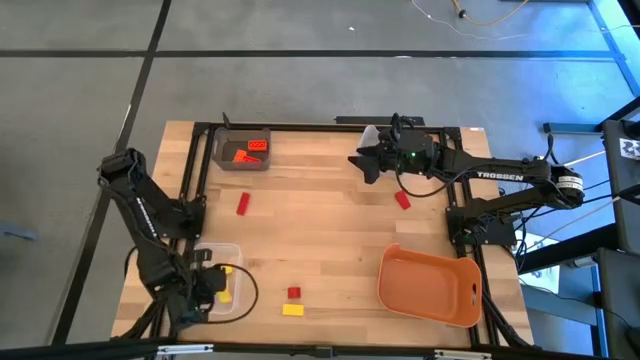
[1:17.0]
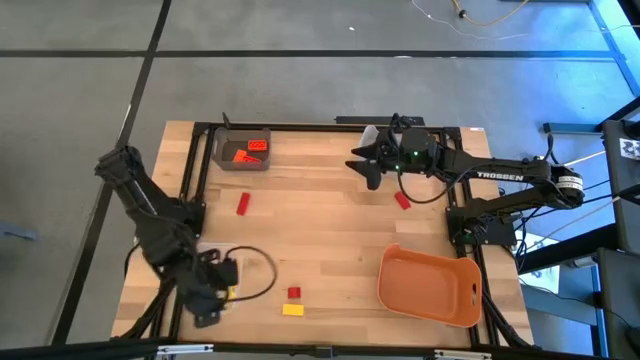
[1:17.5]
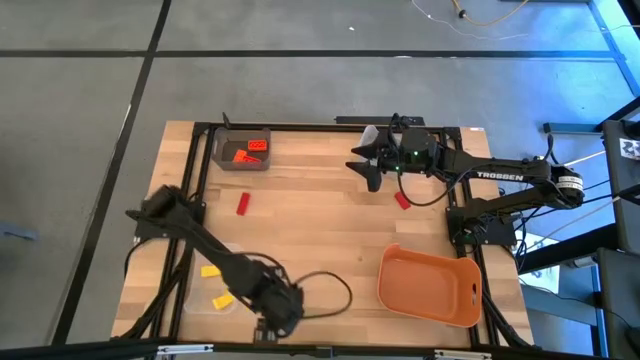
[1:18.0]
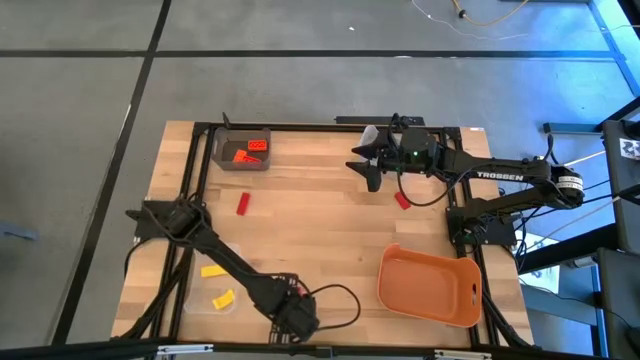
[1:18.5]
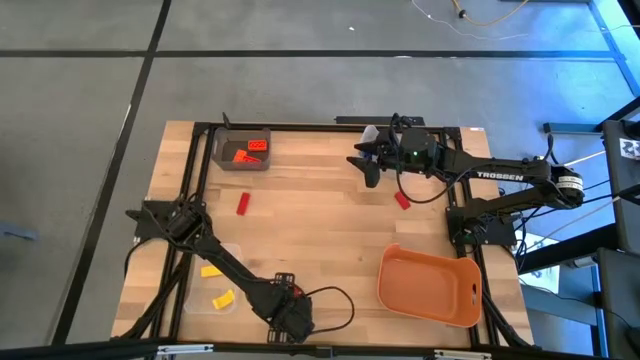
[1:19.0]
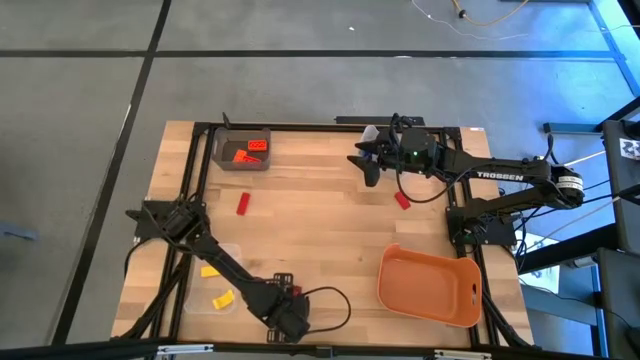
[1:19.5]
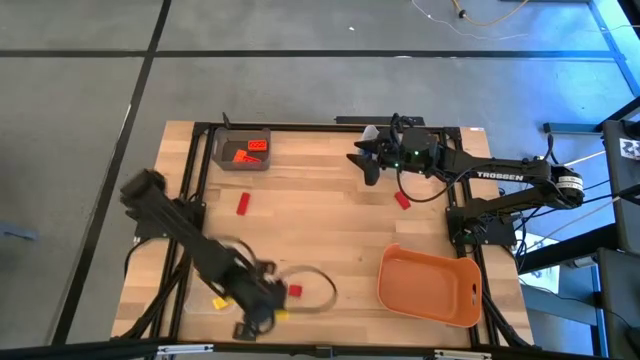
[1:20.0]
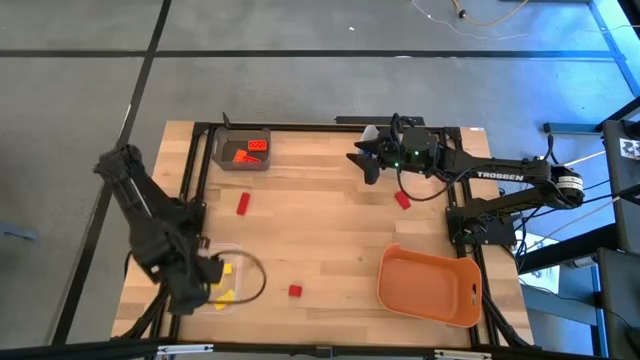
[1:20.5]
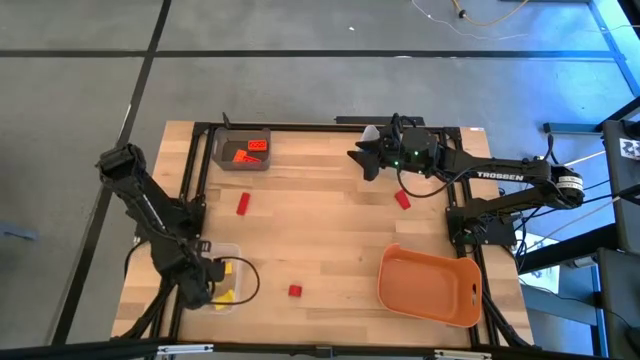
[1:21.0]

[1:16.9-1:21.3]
Task: Sort & place blocks by color
Put the yellow block into the transparent bin

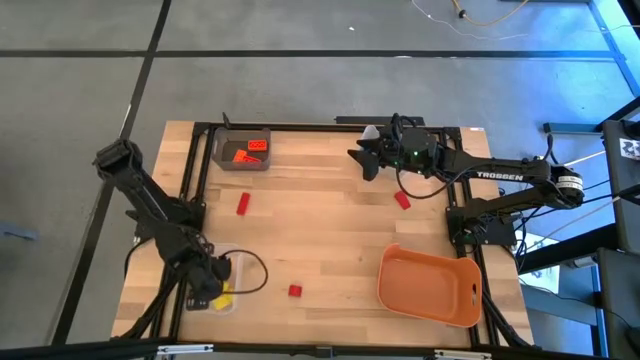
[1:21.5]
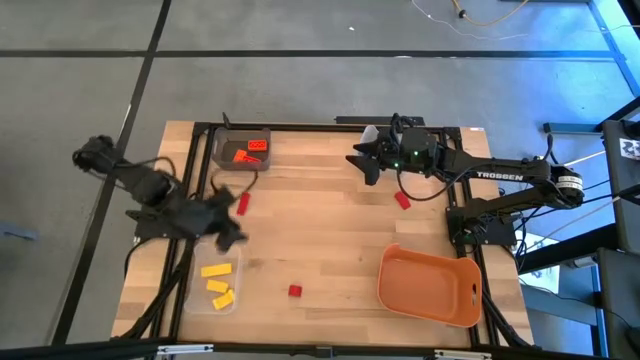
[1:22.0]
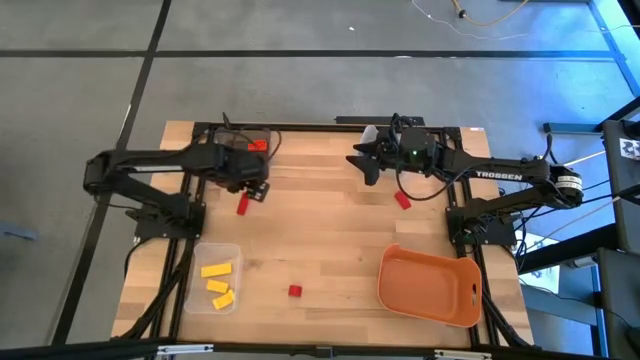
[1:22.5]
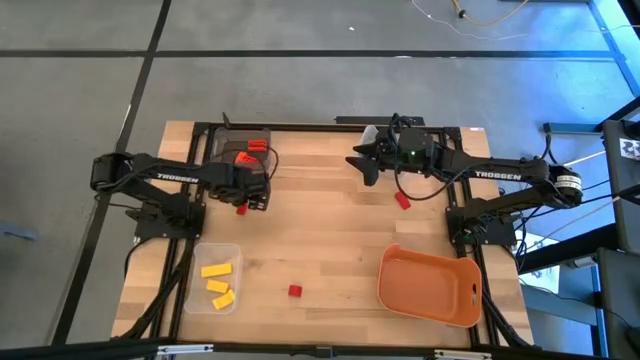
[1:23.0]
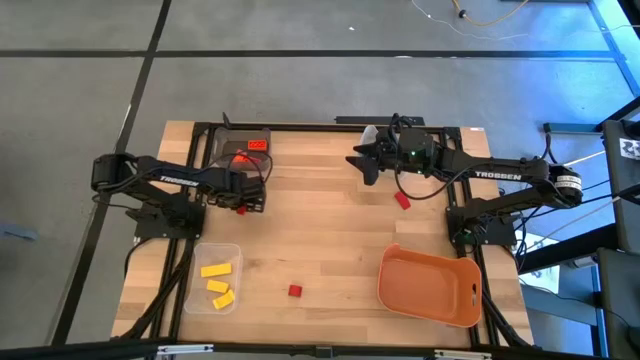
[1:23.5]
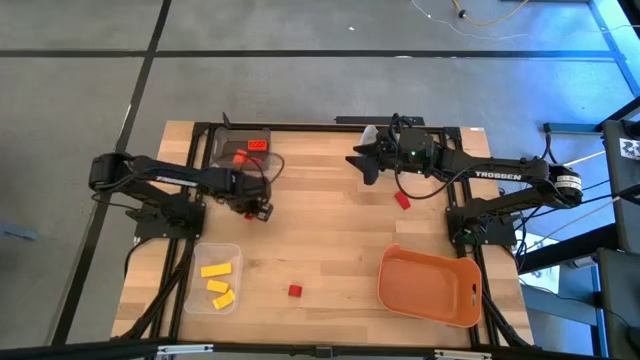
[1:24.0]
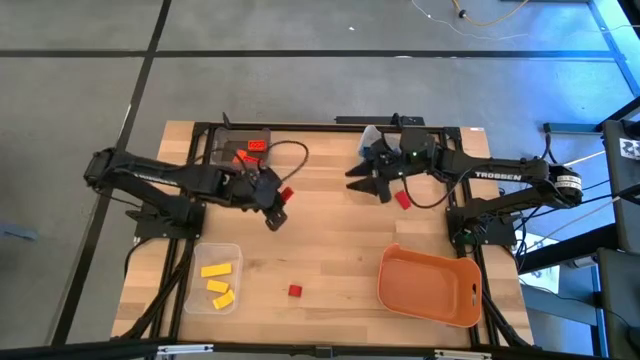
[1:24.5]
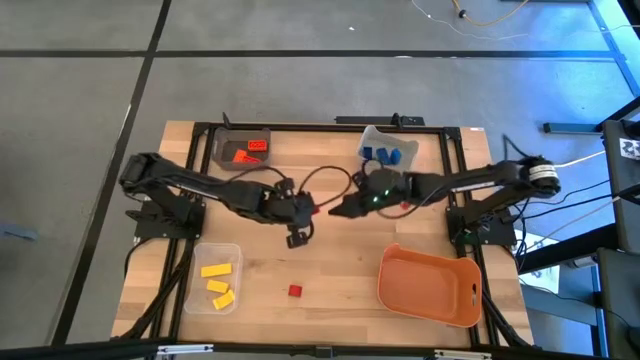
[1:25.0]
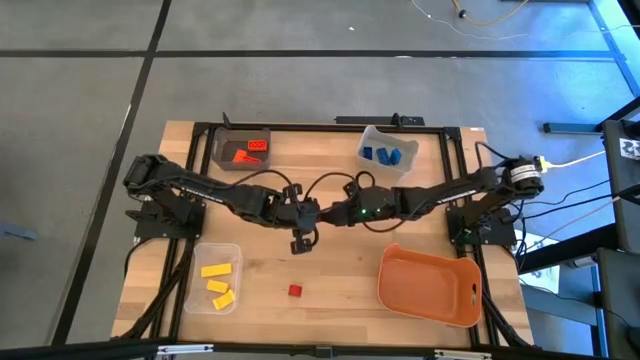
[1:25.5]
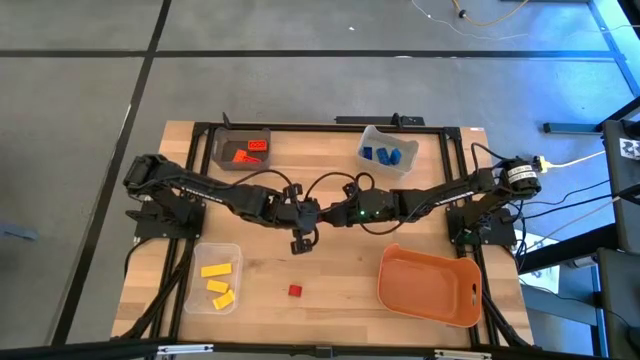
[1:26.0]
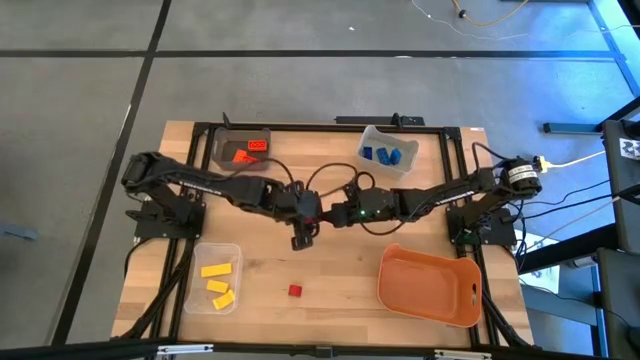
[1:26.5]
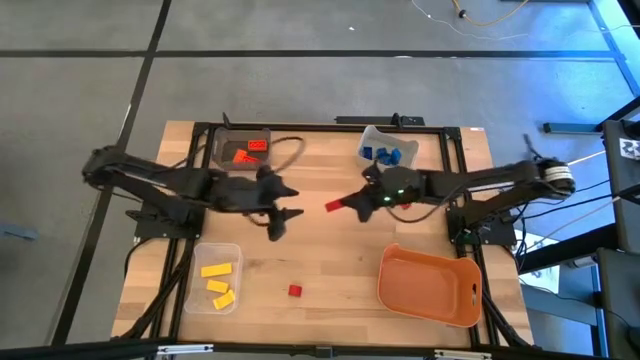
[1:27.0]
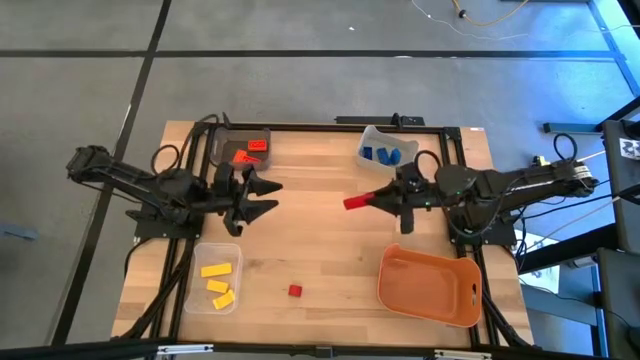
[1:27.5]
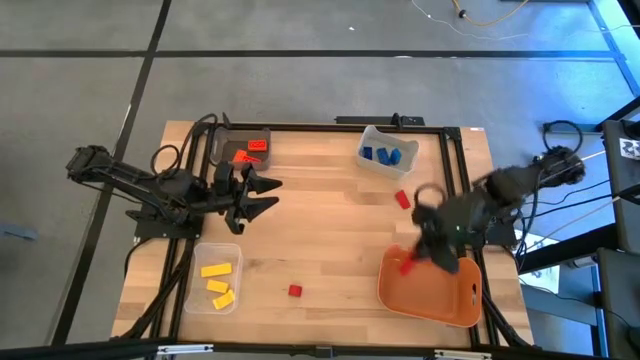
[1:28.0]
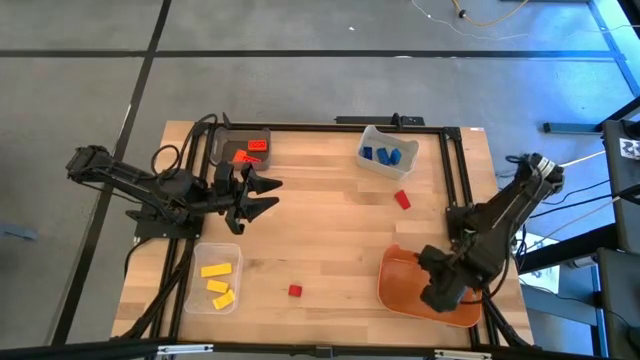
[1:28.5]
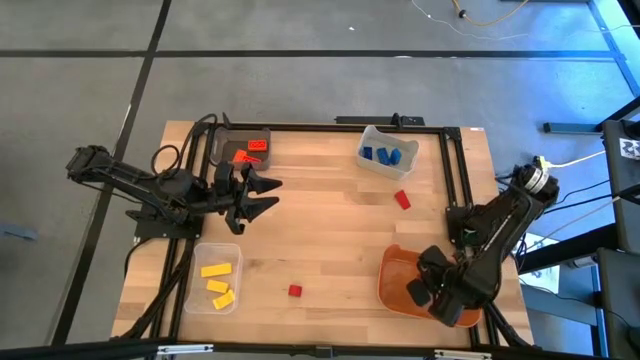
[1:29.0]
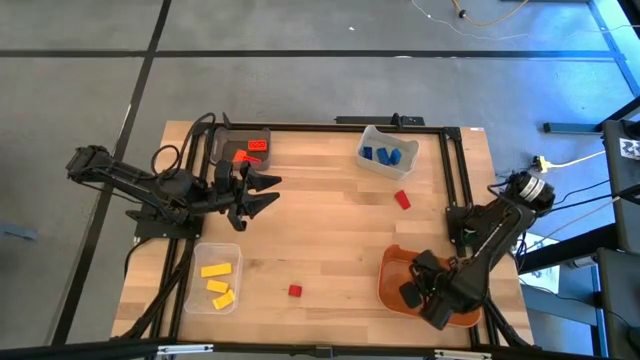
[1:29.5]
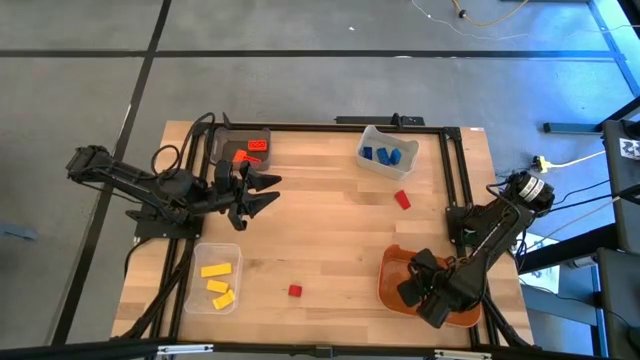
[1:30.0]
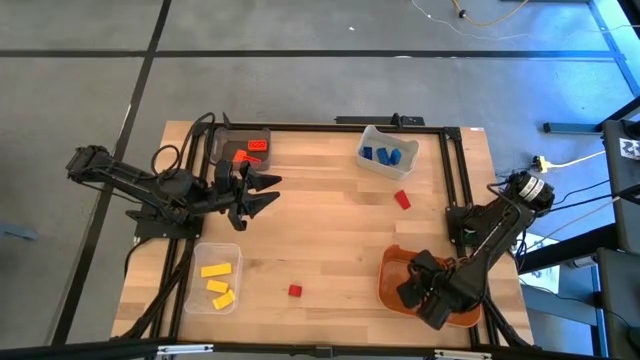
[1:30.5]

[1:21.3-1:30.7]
Put the top left red block into the orange bin

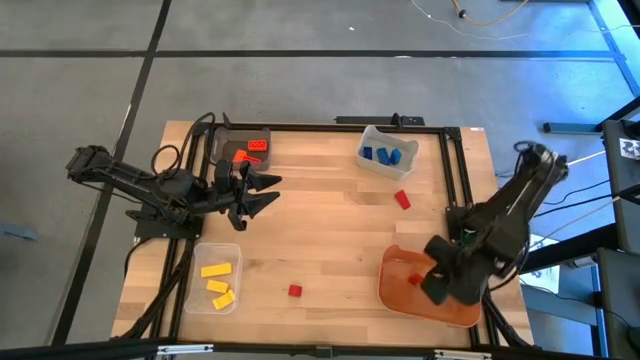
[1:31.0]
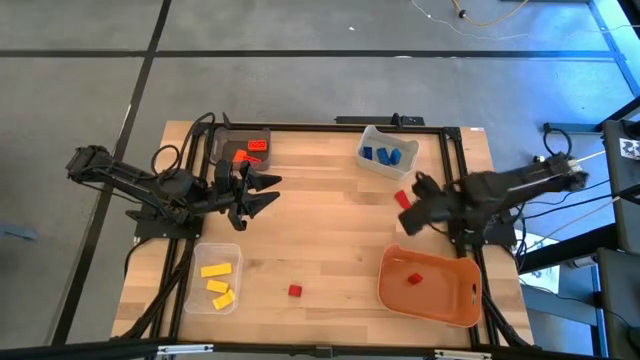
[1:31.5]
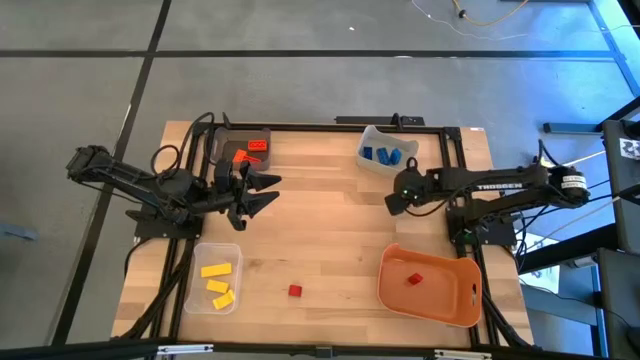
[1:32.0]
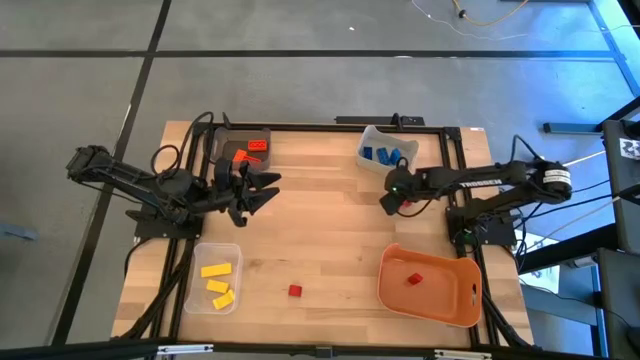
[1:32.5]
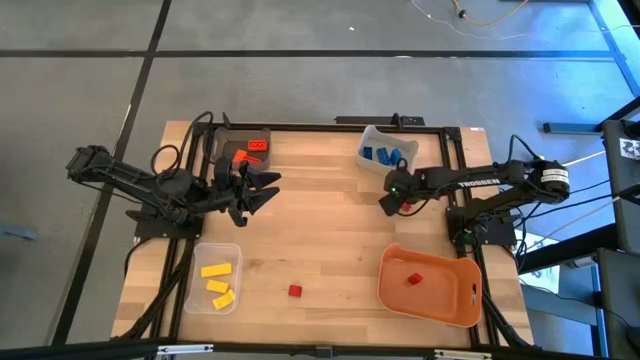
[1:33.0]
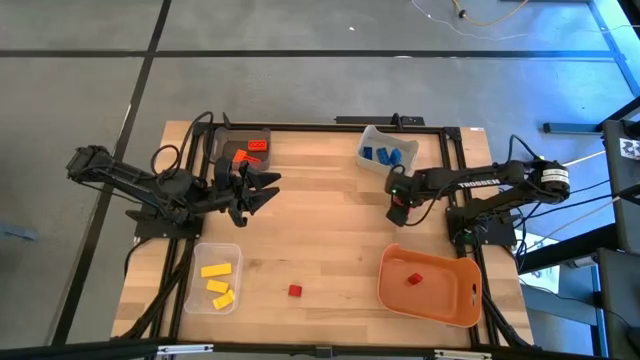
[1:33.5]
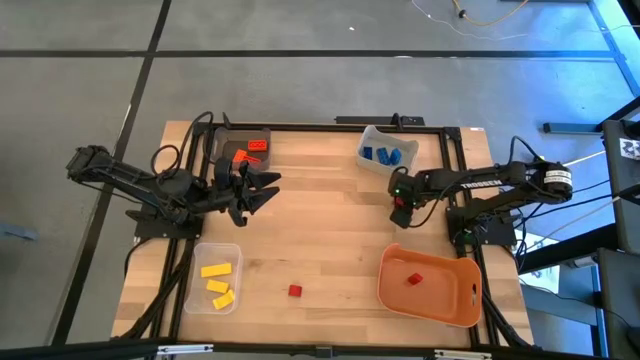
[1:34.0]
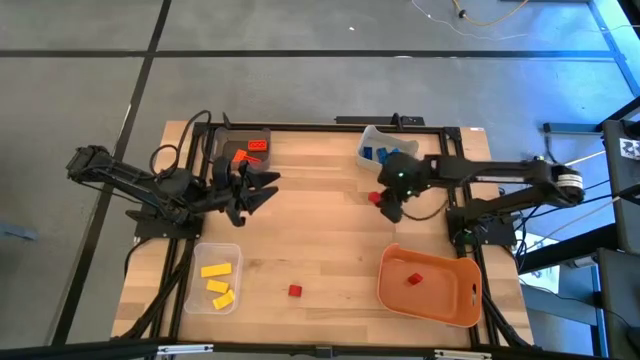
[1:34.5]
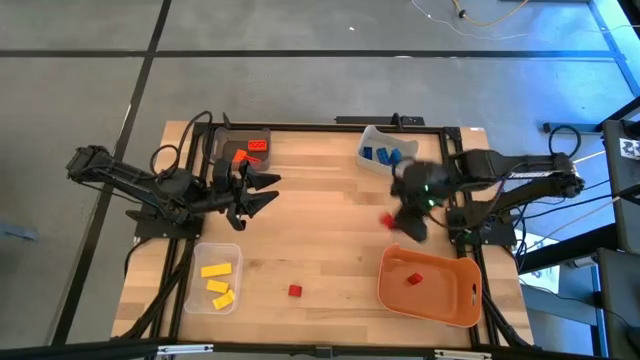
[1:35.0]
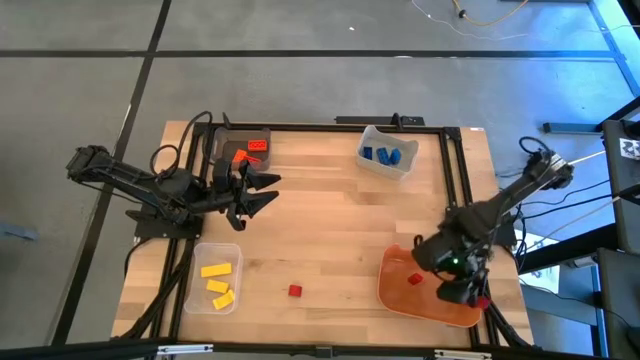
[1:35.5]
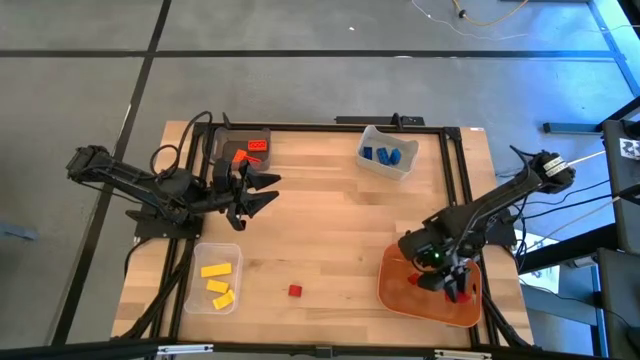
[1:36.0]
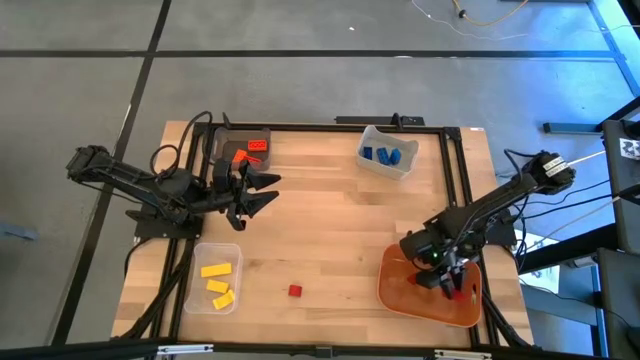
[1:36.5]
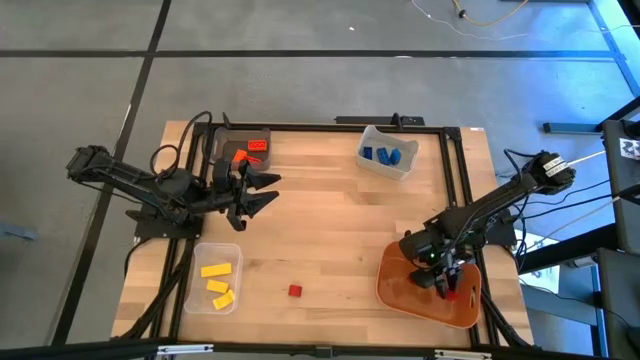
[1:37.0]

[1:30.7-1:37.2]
Put the top red block into the orange bin

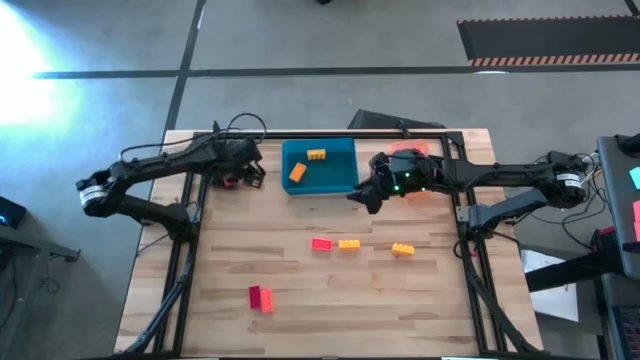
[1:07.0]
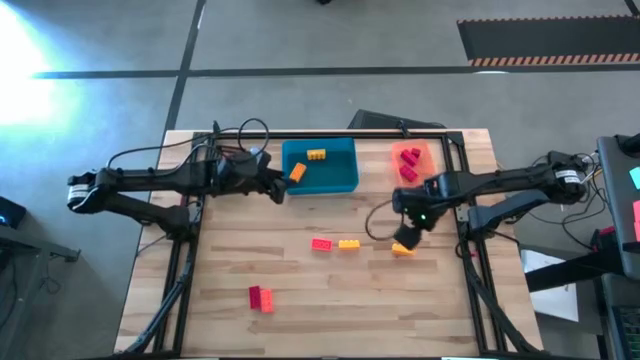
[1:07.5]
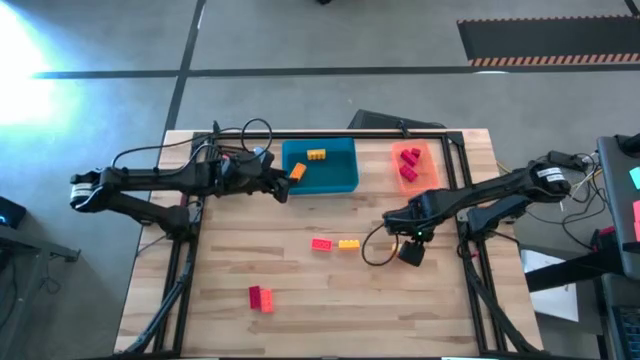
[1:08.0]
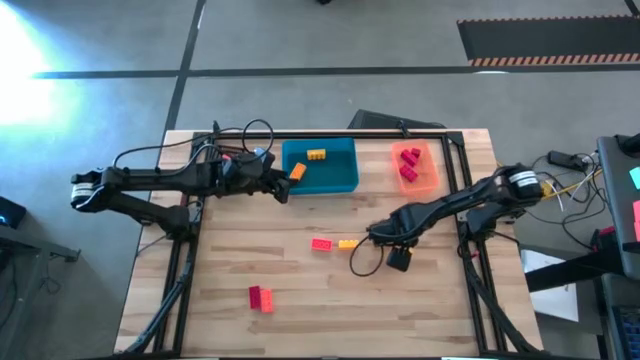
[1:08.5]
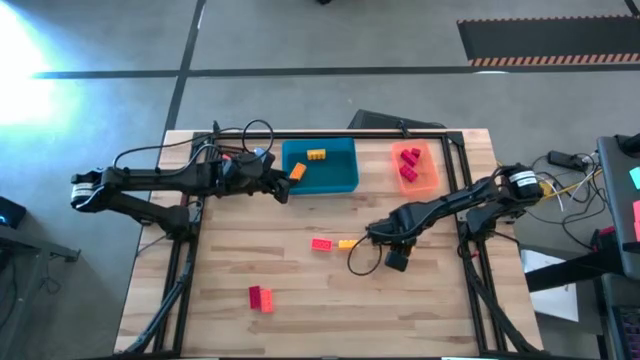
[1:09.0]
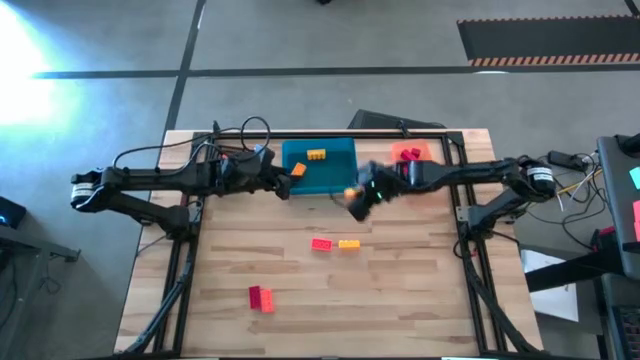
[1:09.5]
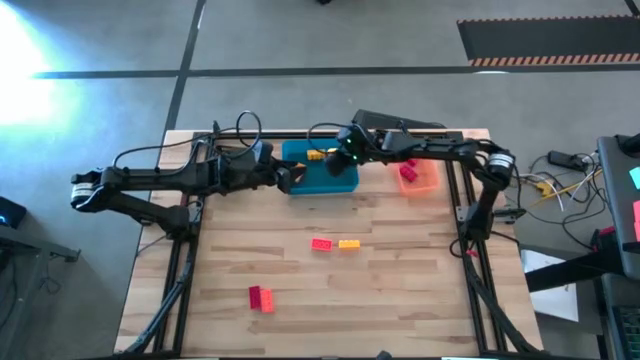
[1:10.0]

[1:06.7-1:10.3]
Task: Sort & place blocks by color
Put the yellow game piece into the blue bin
